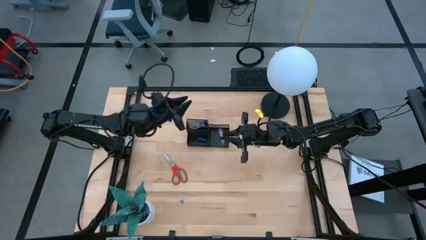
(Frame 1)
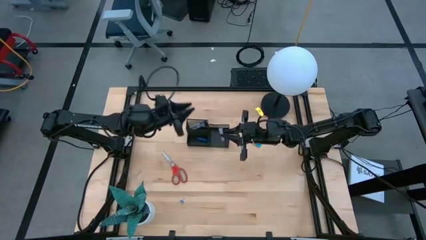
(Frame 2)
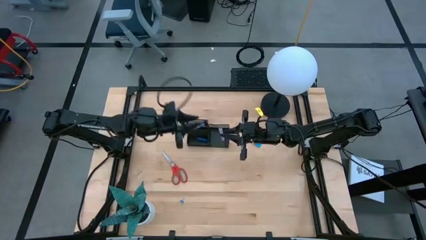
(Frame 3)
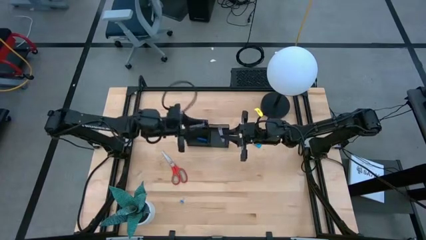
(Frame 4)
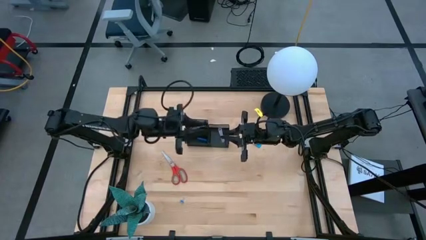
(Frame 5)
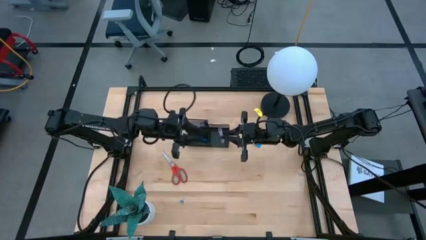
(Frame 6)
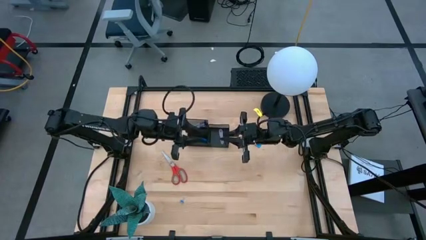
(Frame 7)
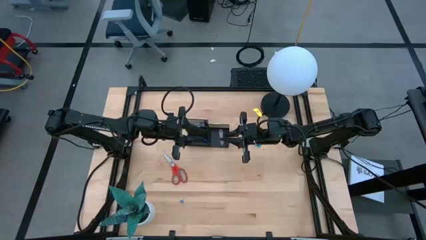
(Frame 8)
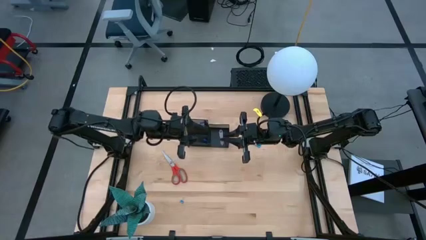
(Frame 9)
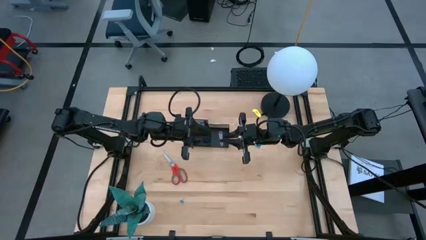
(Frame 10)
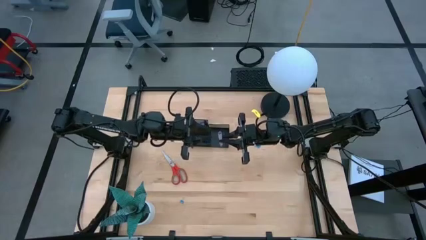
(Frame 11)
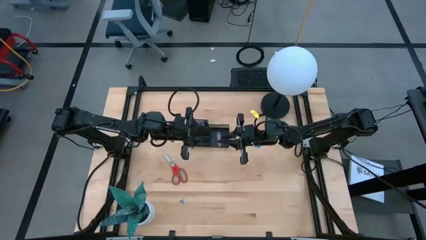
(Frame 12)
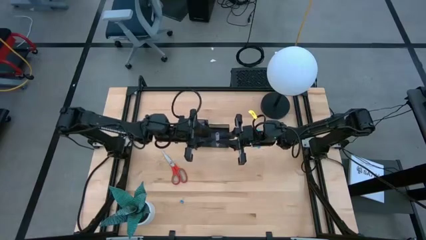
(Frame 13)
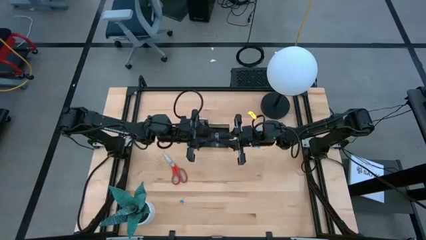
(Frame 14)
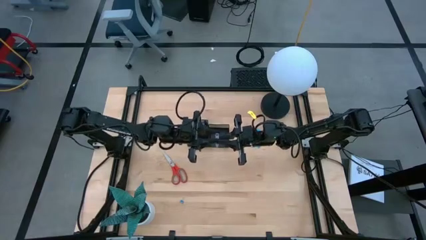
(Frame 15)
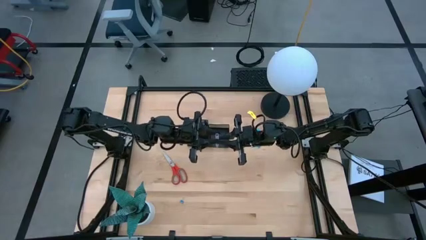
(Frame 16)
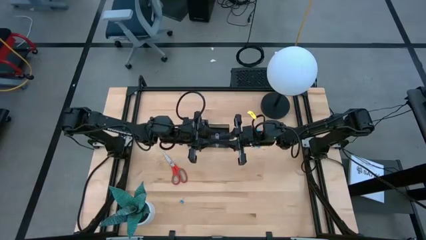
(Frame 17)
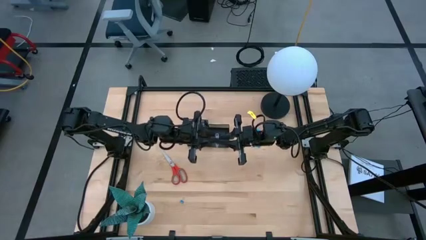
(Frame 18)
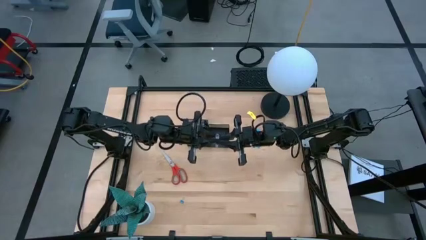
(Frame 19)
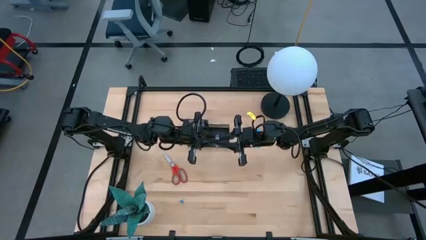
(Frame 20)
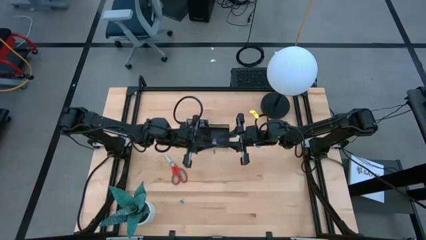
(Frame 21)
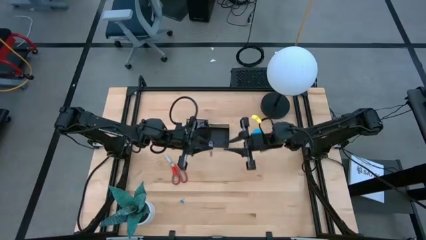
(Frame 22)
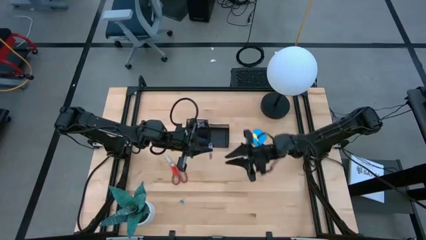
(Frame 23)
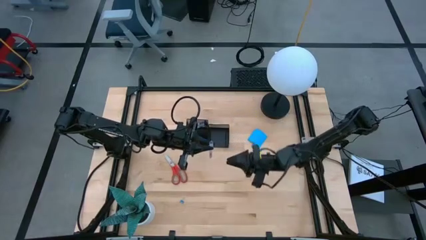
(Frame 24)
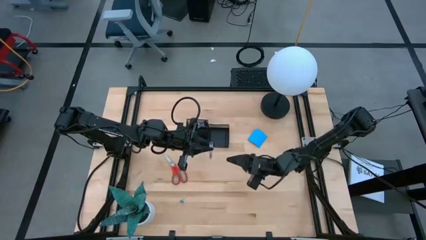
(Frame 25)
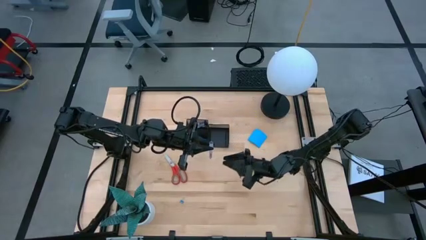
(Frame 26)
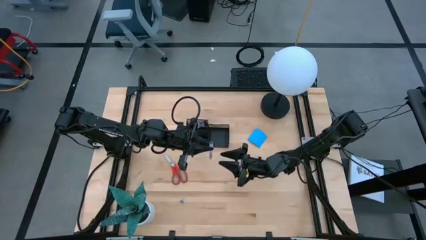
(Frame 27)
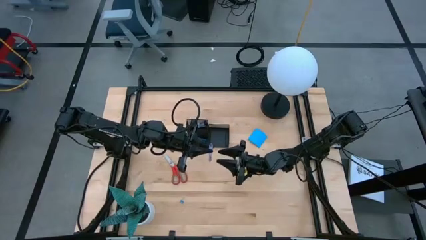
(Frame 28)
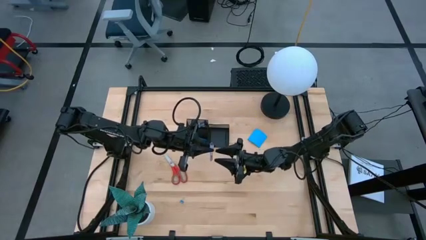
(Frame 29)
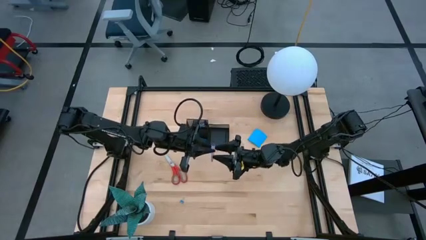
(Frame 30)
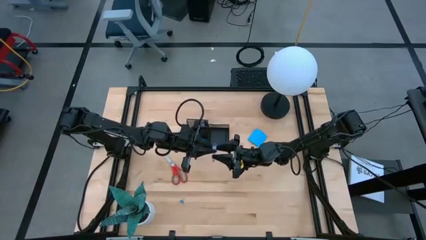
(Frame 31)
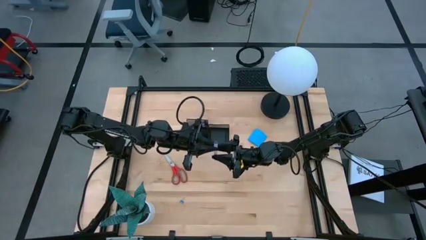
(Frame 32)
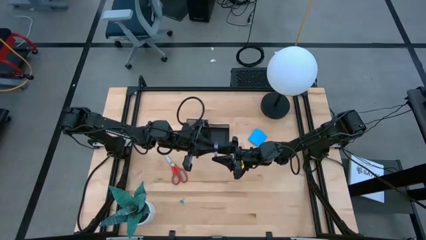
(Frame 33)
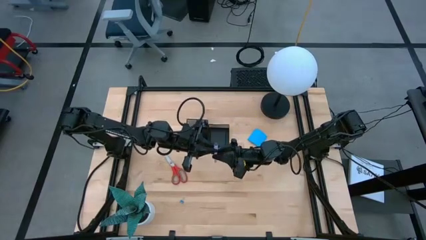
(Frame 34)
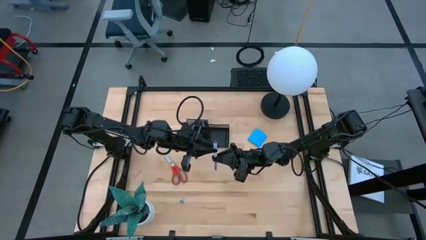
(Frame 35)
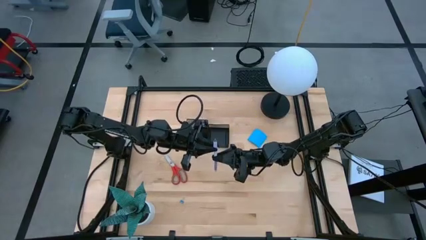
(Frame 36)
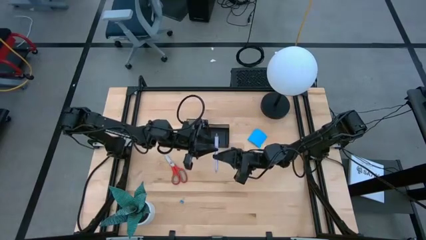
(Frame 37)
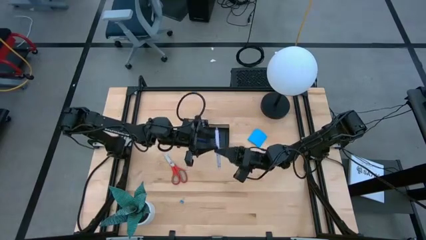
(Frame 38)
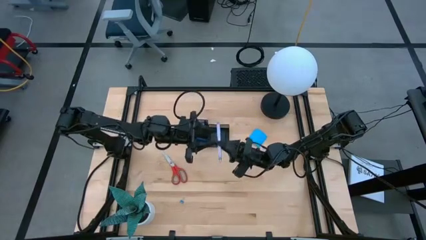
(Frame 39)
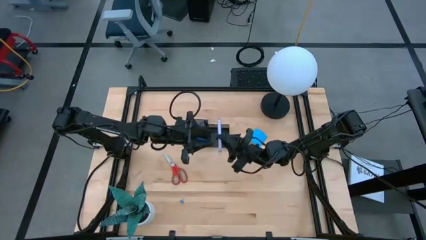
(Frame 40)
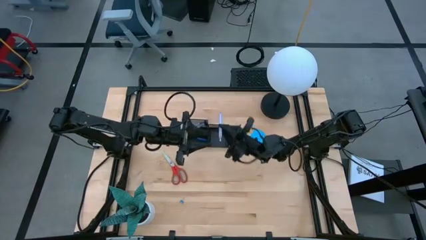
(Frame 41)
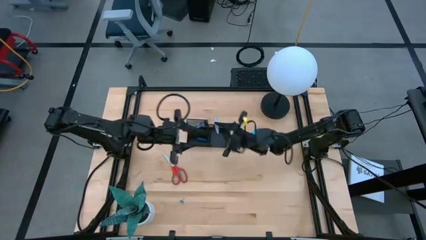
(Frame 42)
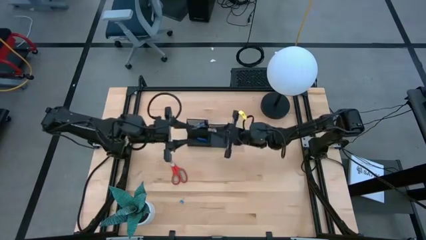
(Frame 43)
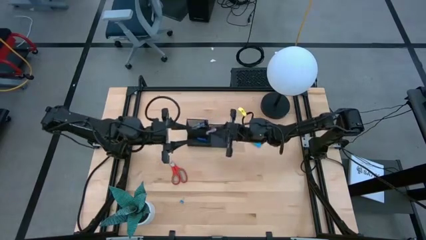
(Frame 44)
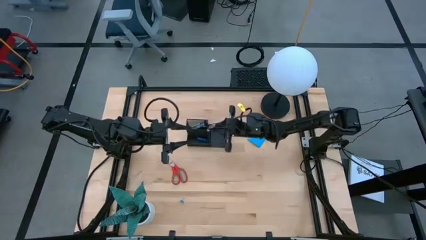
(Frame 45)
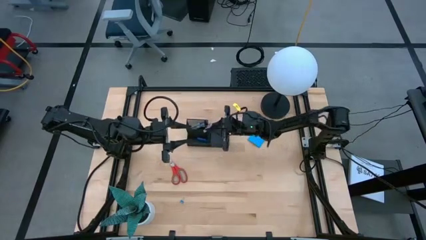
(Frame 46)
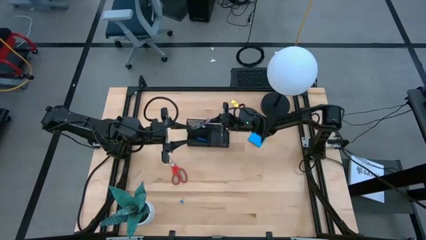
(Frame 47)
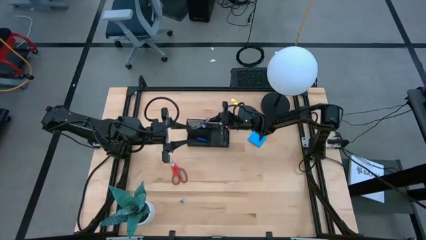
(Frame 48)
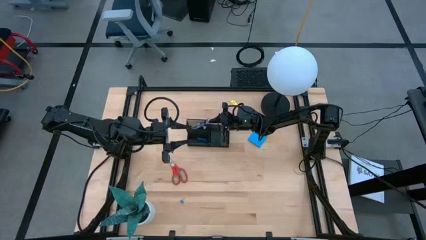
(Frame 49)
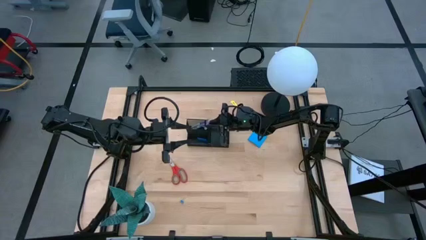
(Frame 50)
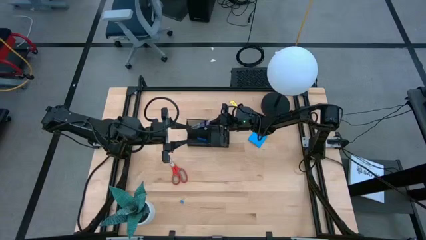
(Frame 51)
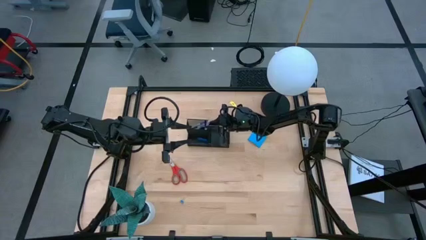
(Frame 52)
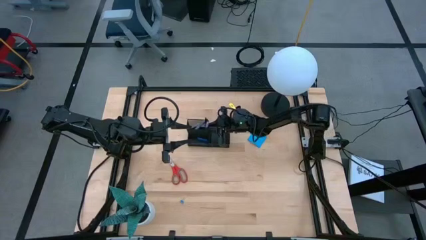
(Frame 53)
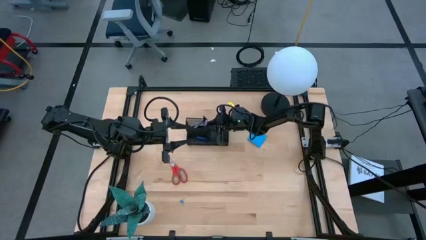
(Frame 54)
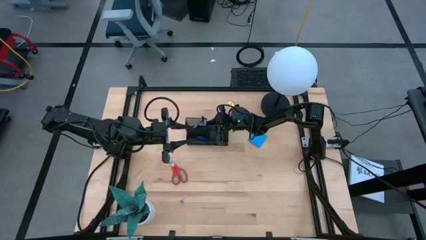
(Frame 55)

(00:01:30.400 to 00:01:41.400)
Task: Pick and place office supplies into organizer
Put the white pen into the desk organizer

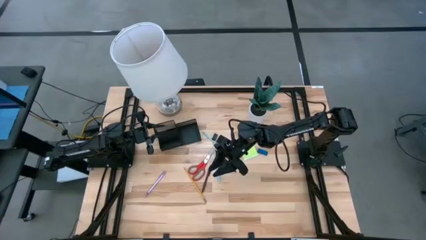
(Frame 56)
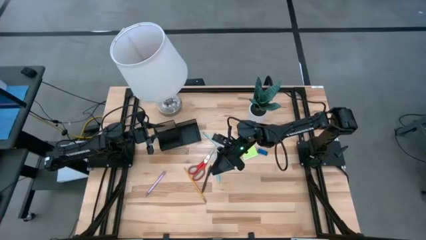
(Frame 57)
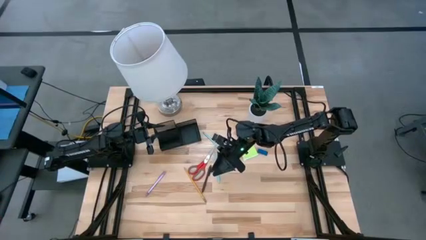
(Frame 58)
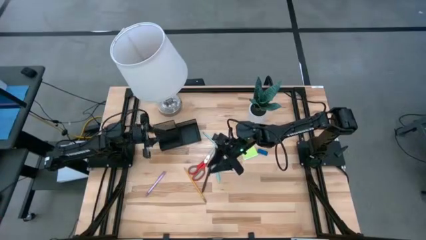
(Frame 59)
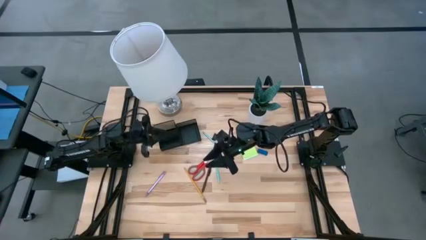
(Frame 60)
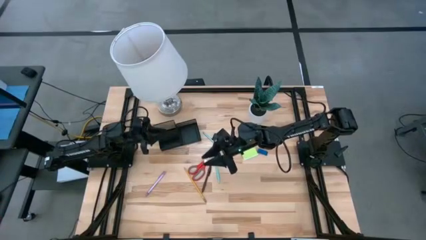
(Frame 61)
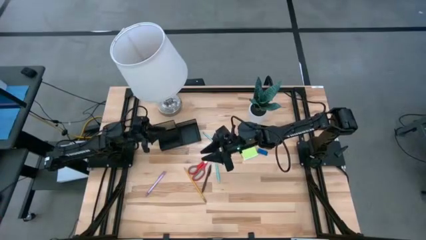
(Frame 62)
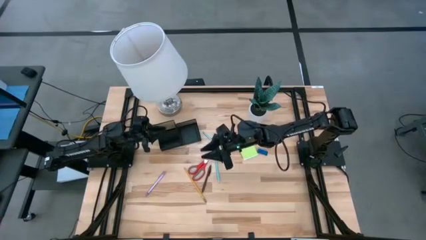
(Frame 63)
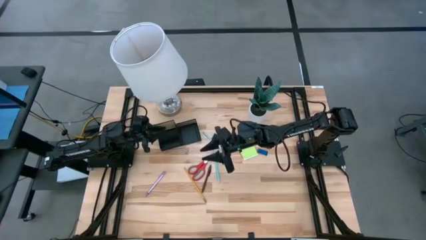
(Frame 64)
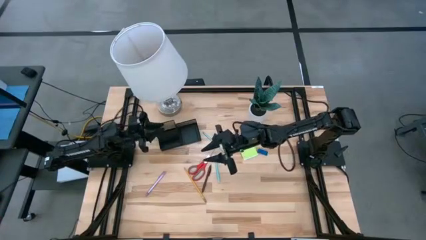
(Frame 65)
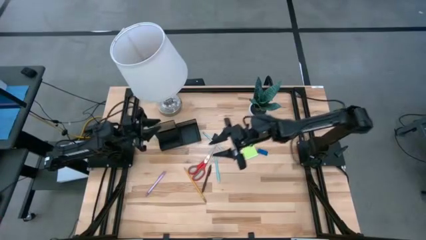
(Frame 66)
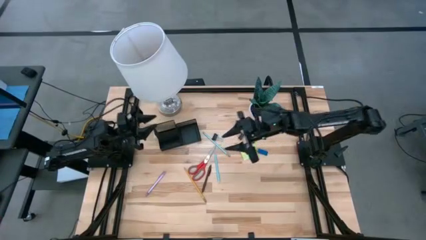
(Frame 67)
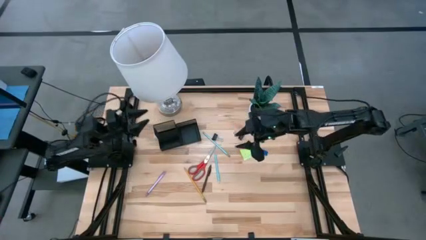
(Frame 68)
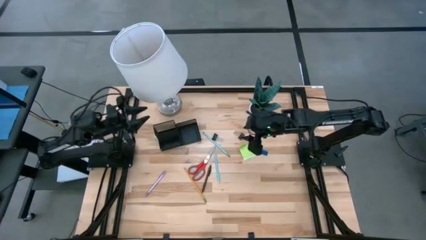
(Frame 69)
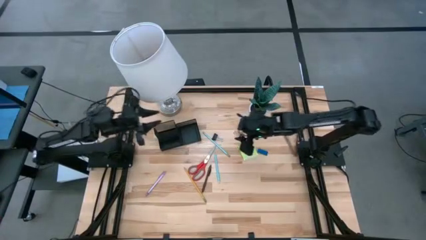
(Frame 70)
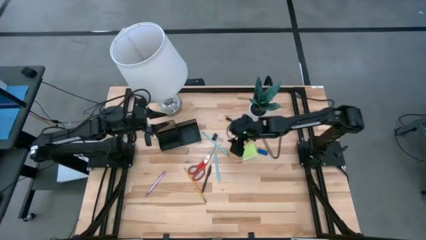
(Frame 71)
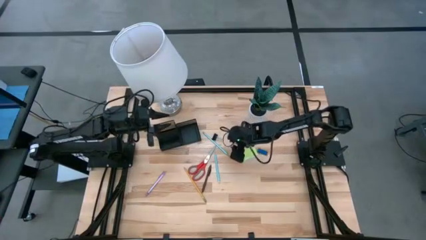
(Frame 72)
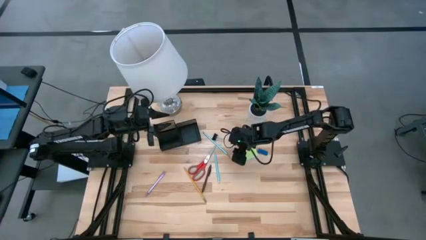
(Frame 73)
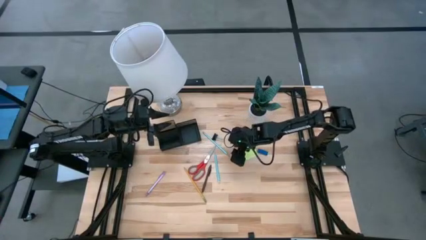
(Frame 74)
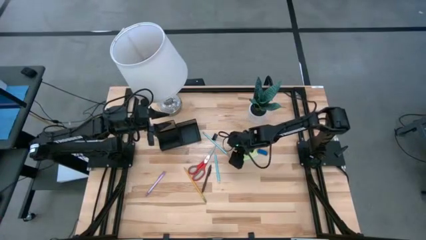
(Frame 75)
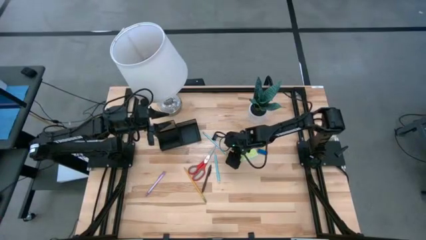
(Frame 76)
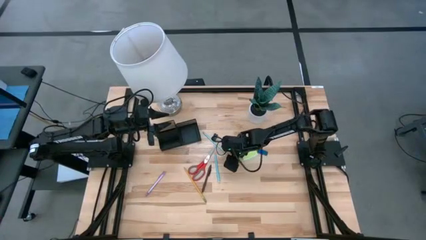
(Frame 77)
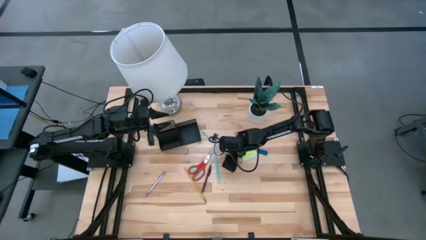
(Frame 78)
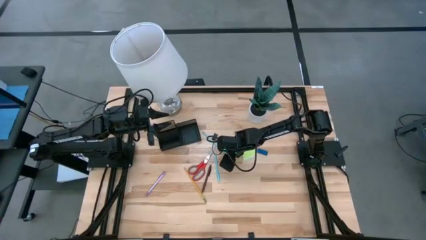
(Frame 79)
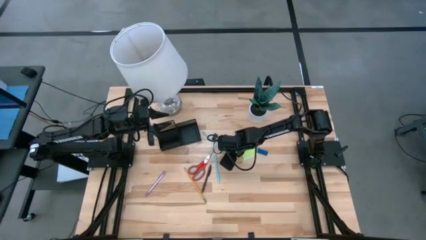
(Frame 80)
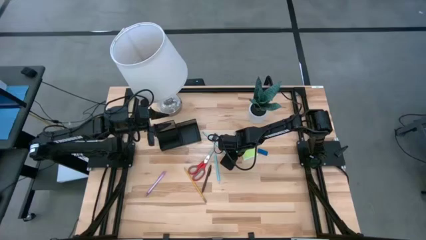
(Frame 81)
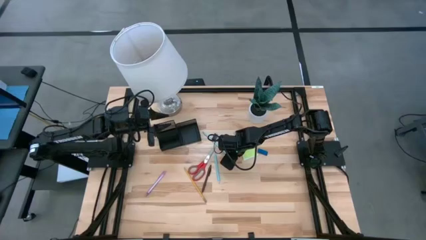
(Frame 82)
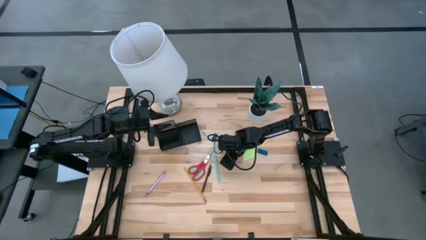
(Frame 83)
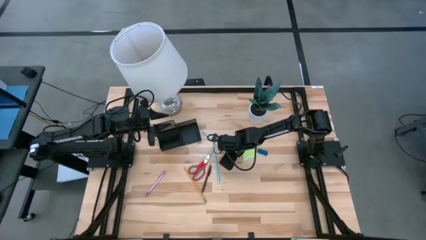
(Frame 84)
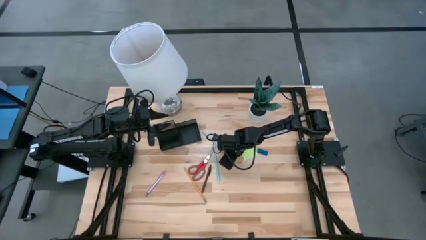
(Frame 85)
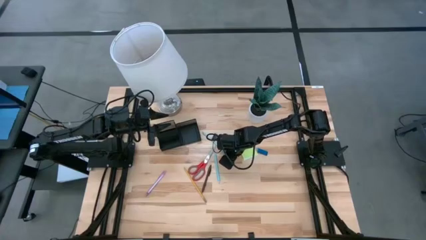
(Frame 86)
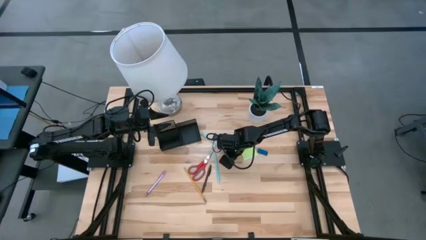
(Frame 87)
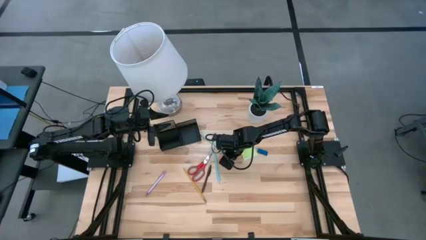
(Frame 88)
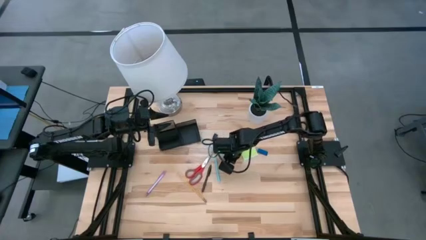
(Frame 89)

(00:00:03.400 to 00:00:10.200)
Task: Pick and place office supplies into organizer
Put the top blue pencil into the black desk organizer
